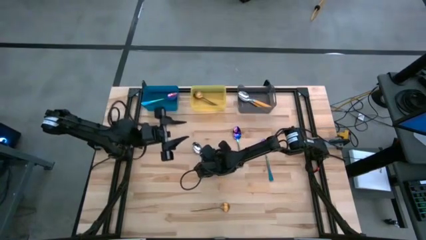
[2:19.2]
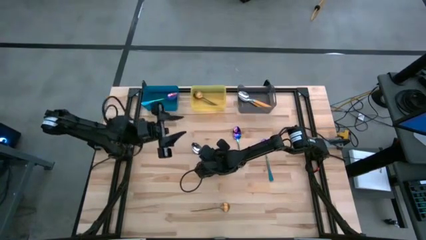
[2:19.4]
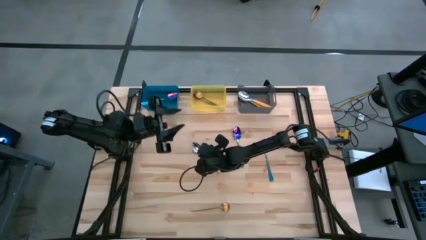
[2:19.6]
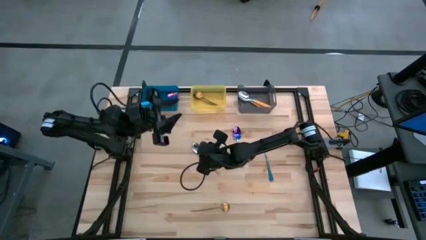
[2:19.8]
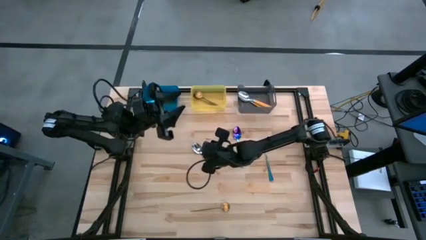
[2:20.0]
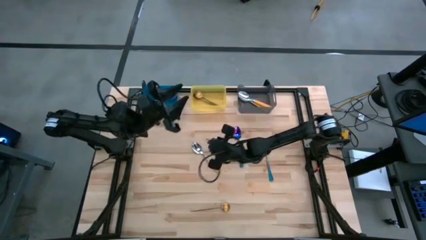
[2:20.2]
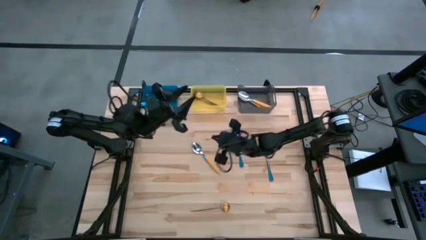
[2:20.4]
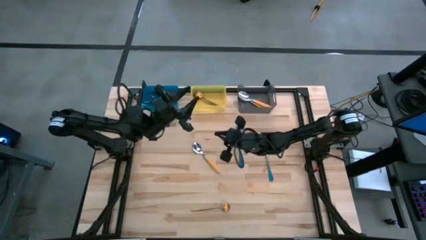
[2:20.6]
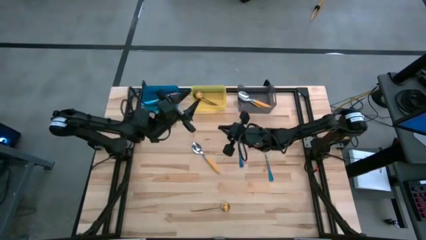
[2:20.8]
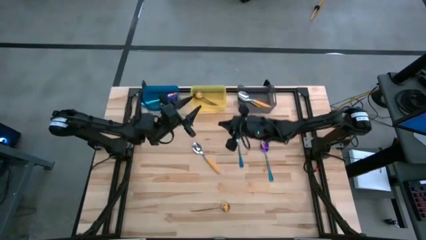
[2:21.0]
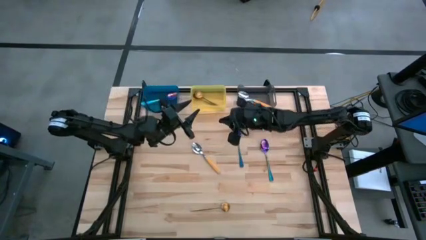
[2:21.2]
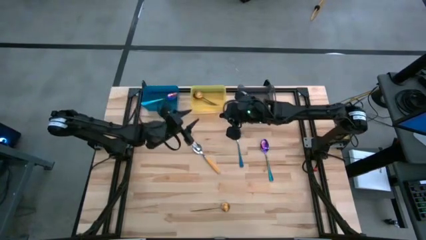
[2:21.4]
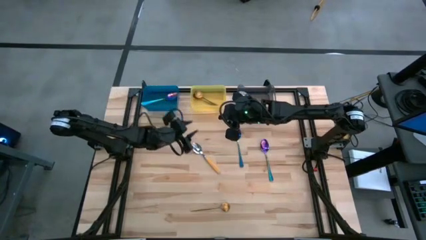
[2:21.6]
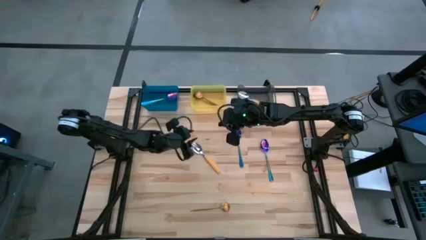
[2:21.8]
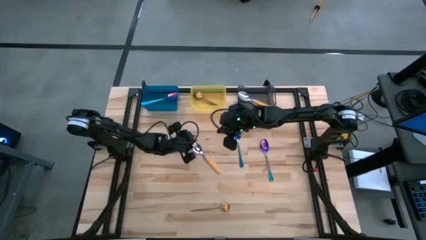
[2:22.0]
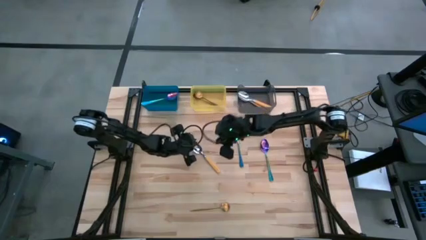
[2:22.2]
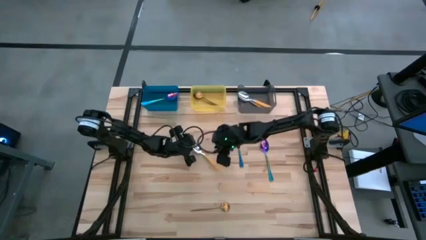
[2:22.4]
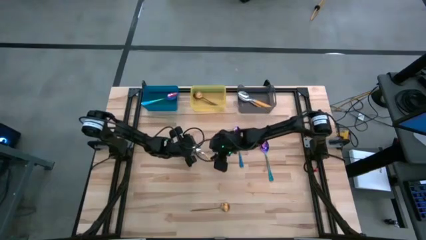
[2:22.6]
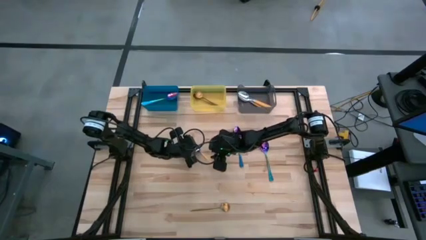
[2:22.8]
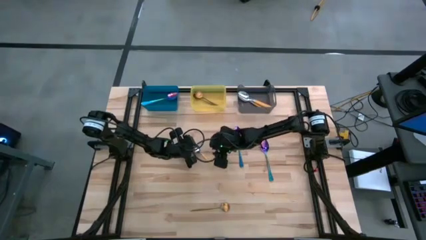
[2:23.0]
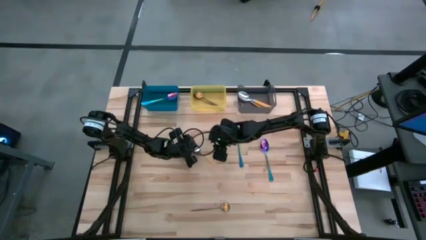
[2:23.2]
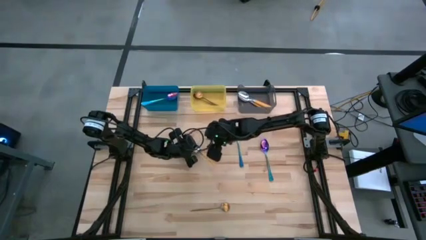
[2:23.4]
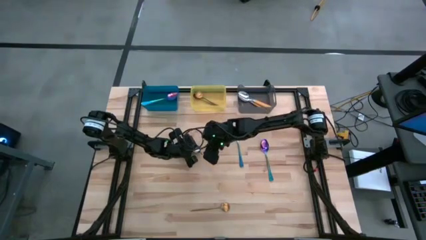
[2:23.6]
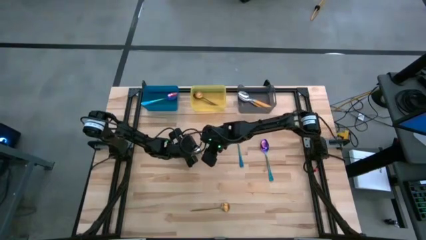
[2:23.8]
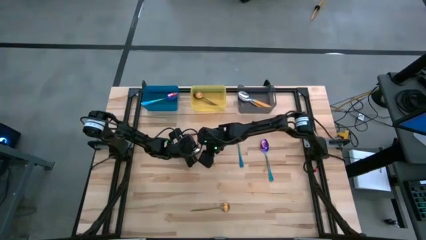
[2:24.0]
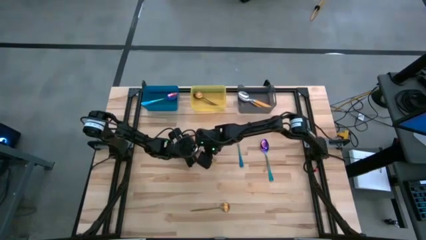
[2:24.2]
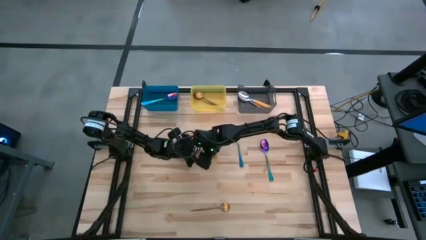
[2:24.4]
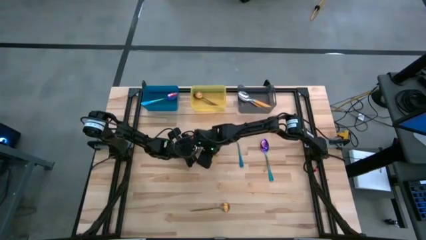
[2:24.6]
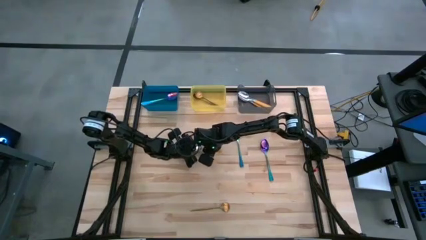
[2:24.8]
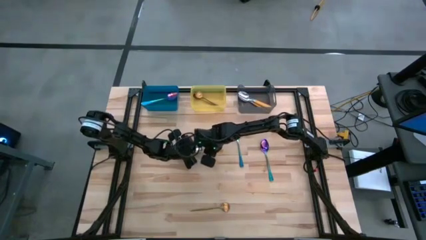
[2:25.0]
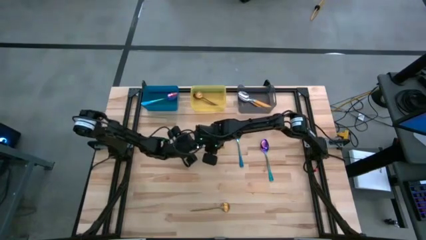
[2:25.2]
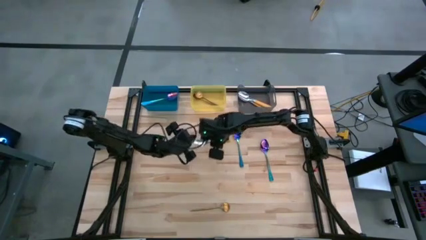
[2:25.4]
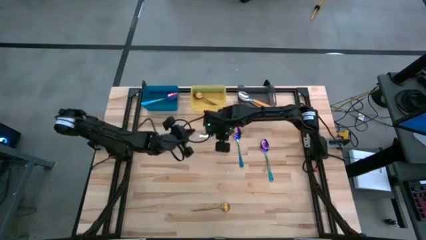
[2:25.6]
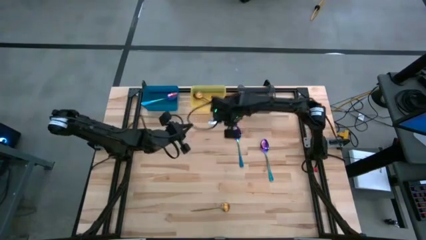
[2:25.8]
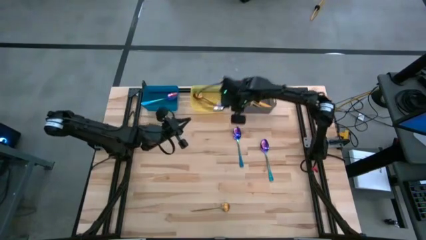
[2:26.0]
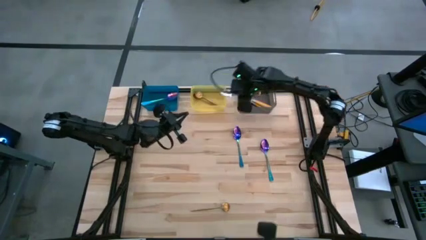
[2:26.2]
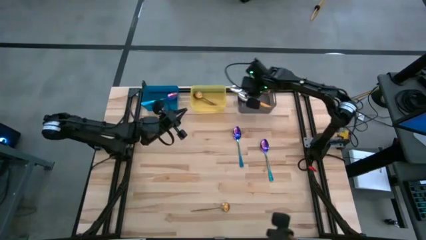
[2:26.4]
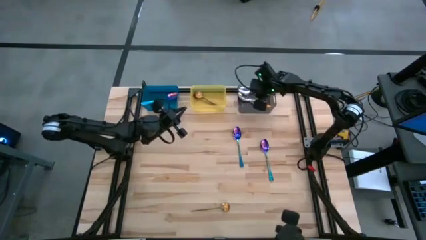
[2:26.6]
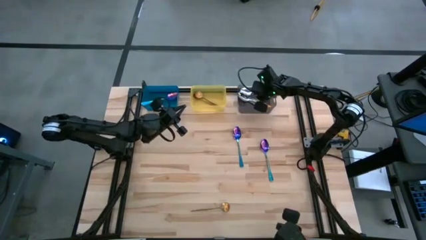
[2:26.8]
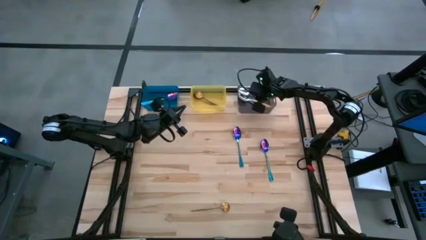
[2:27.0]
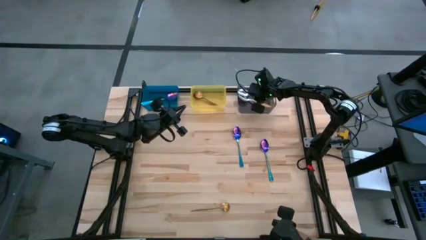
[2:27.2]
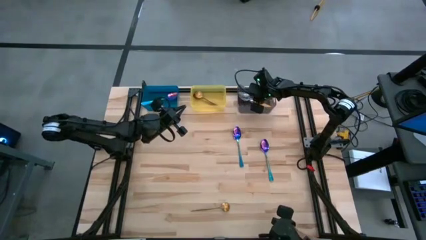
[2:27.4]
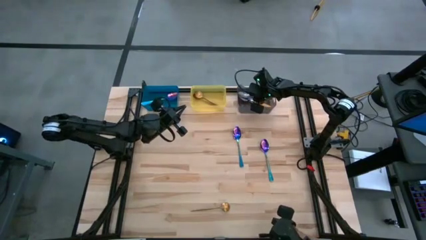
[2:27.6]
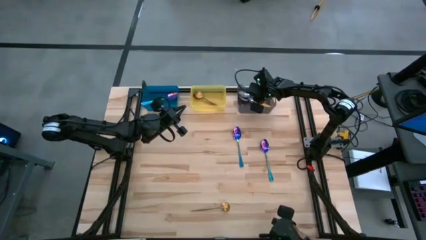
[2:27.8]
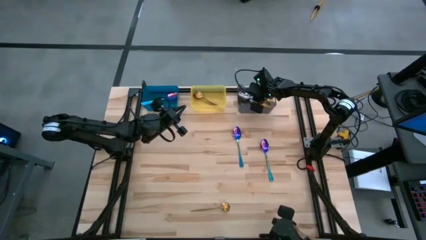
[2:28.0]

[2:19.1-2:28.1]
Task: Sort silverware by color (type)
Put the yellow spoon into the black bin

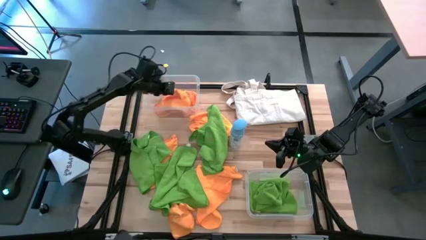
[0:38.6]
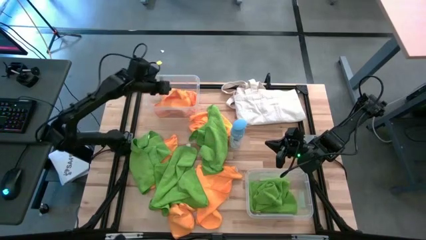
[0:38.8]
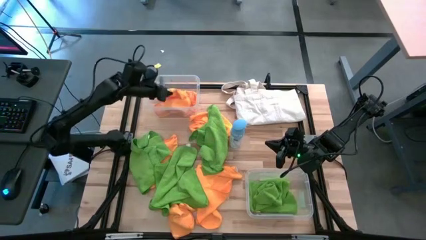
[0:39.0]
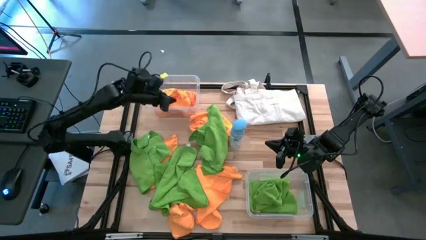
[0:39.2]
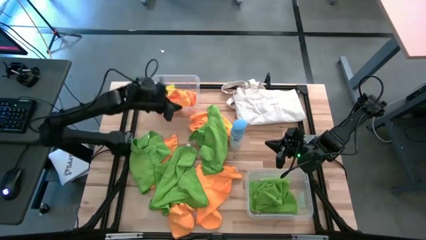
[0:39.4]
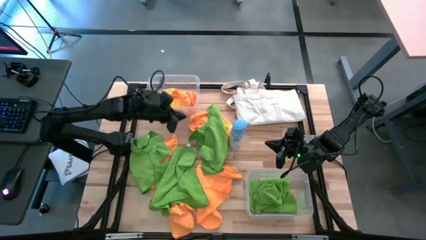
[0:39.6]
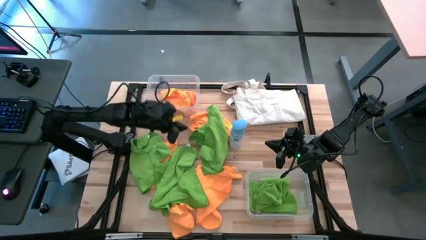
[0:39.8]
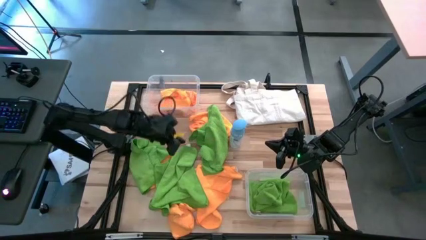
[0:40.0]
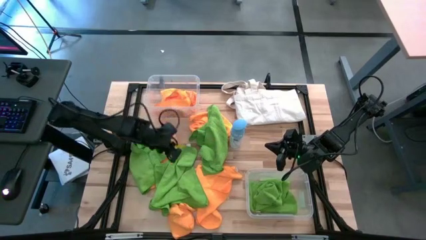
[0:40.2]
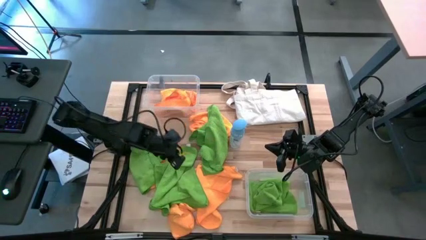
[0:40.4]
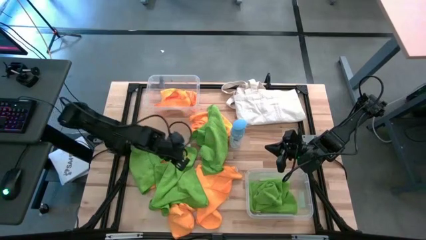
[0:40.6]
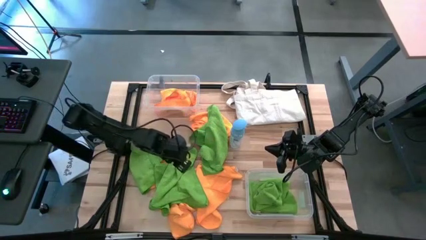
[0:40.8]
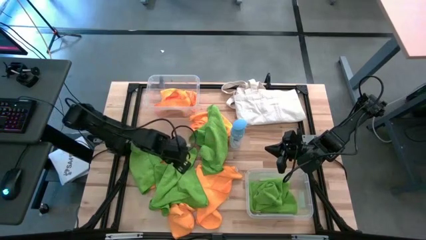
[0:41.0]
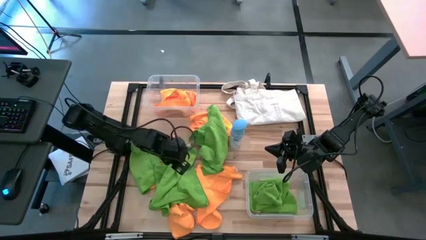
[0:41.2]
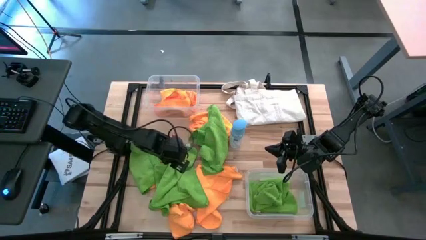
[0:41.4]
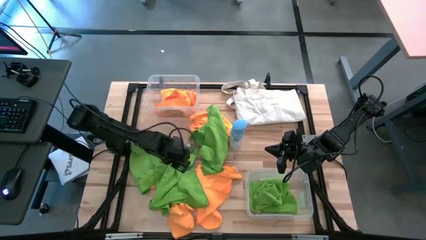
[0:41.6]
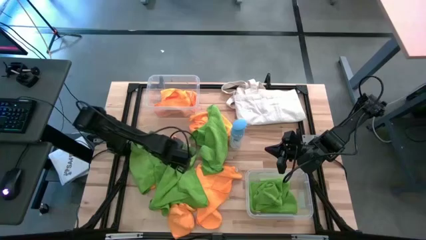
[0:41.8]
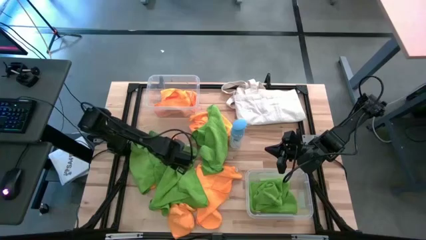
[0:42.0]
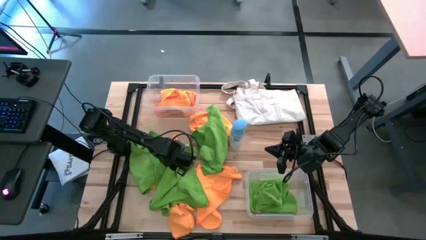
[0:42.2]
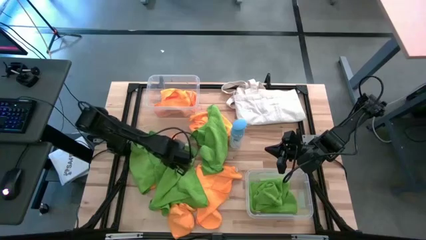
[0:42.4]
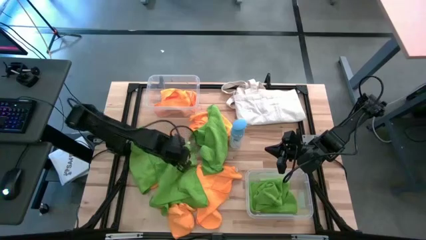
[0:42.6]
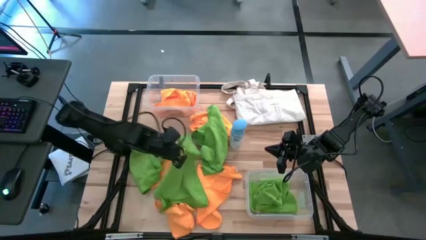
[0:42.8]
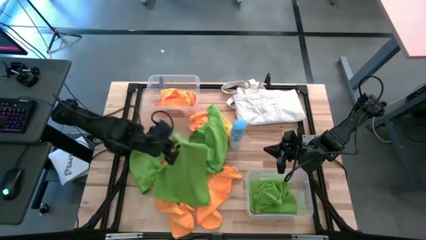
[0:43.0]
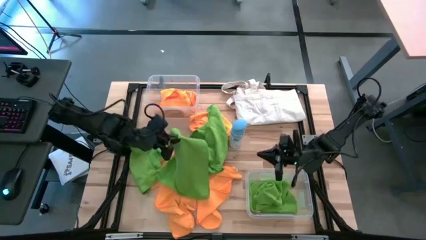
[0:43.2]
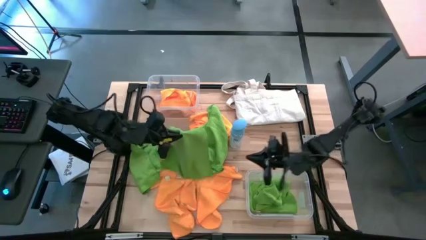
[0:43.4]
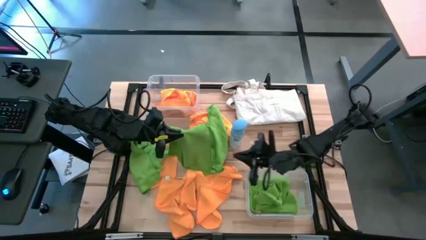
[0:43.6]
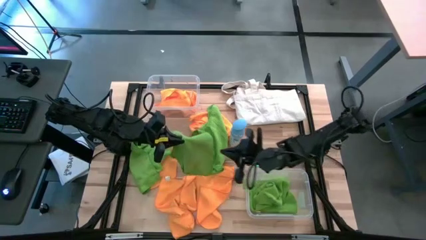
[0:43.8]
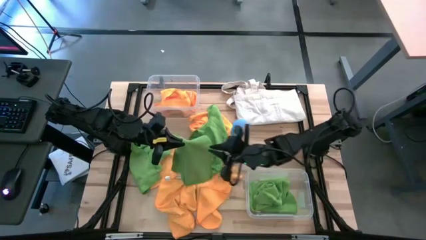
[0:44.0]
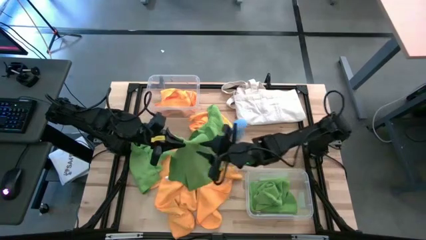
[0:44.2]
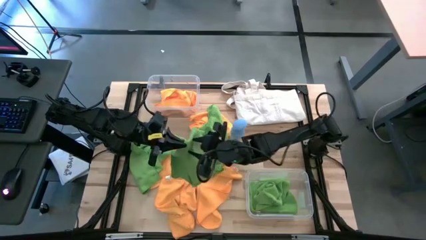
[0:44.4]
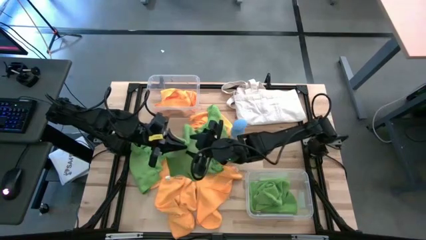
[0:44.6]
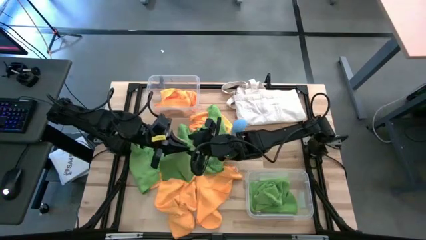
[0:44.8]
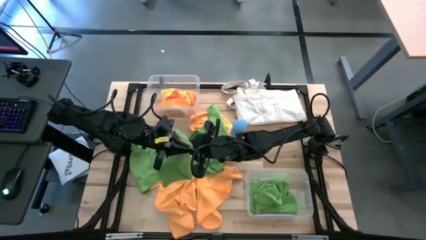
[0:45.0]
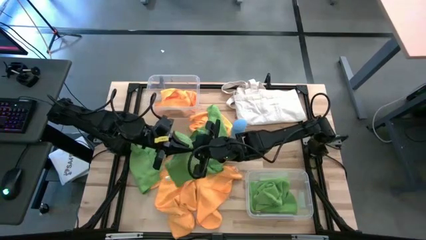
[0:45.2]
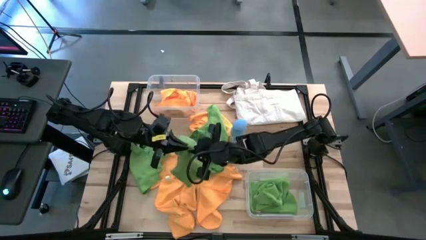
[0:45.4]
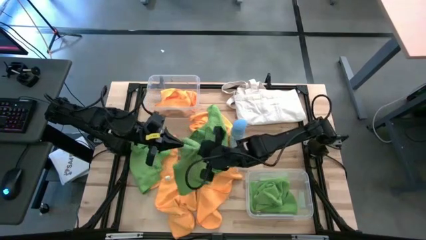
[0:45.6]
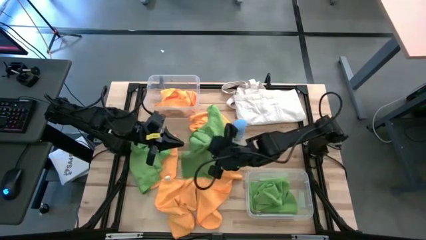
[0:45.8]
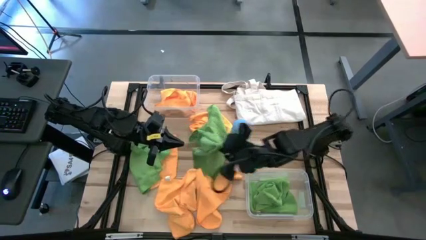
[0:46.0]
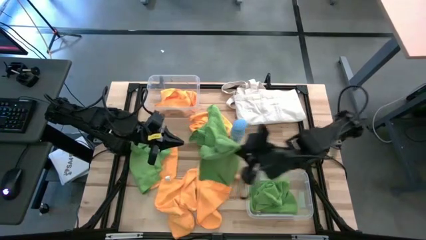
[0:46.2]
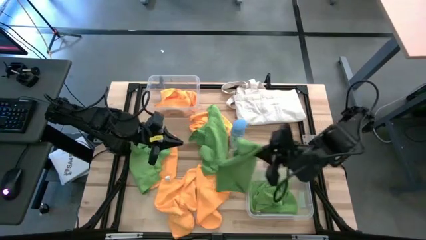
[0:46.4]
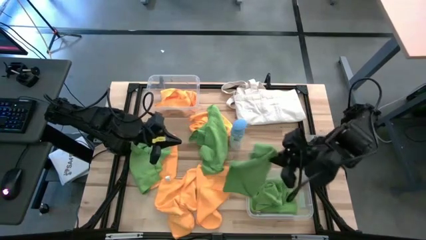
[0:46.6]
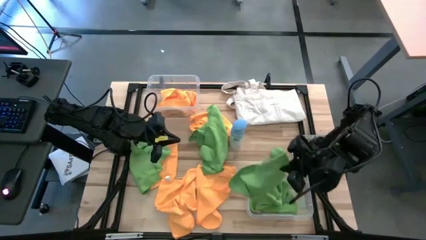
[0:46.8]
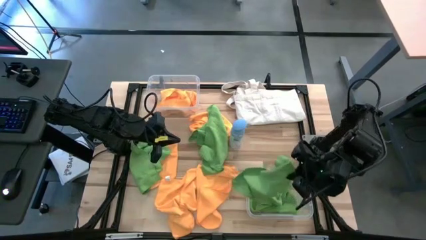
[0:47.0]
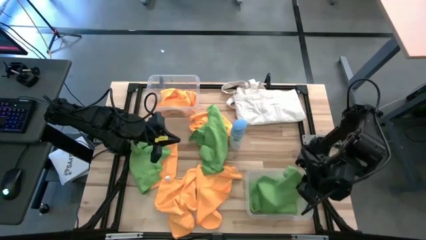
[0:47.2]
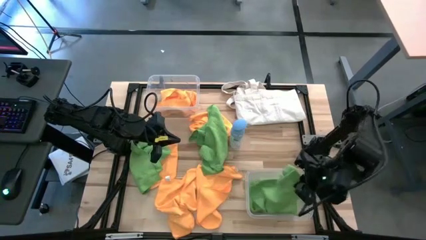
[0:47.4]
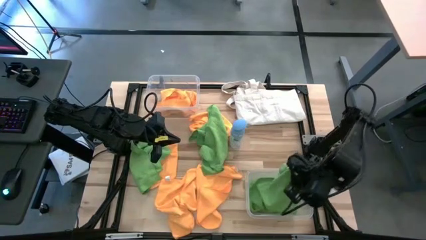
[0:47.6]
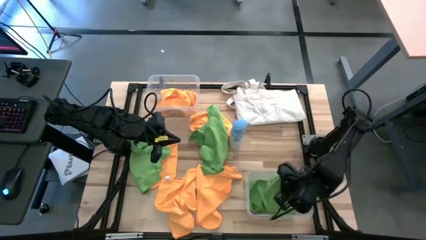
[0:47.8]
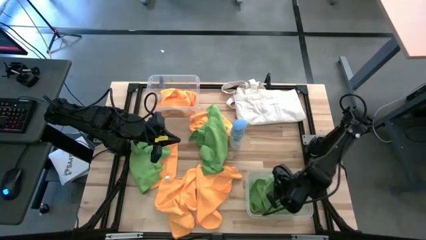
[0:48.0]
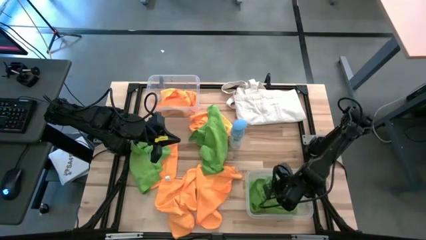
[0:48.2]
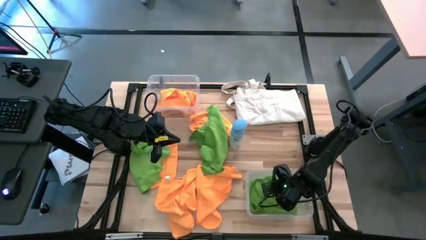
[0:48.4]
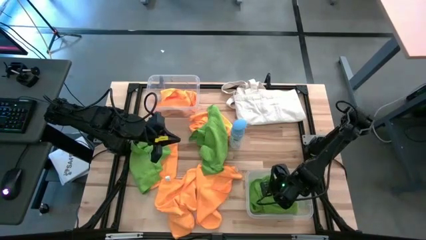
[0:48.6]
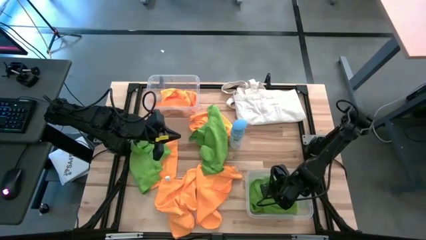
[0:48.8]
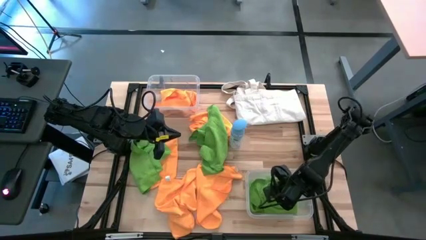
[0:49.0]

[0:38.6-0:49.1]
Task: Sort microfiber towel by color & place in baskets
Put the green microfiber towel into the bottom transparent bin
